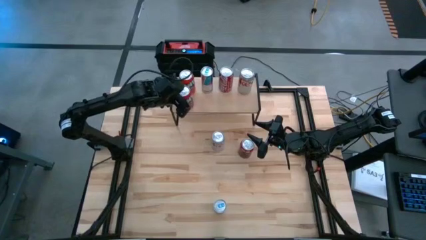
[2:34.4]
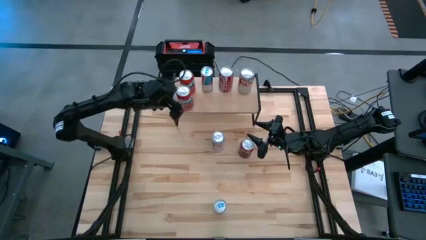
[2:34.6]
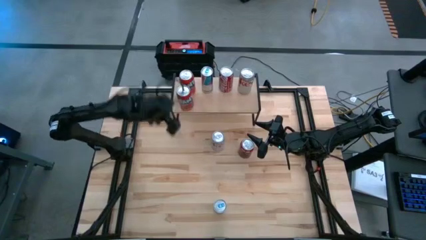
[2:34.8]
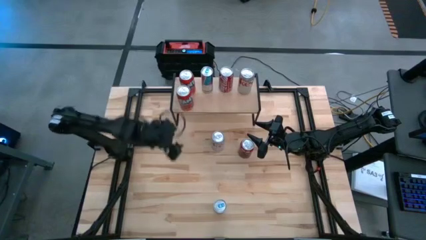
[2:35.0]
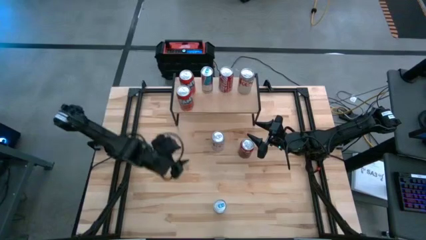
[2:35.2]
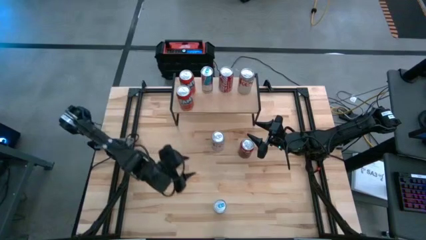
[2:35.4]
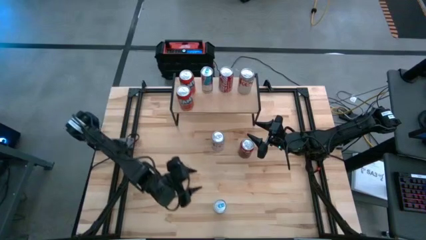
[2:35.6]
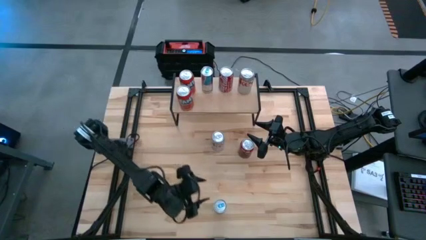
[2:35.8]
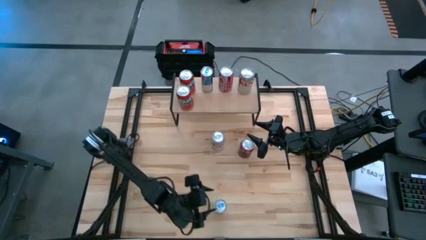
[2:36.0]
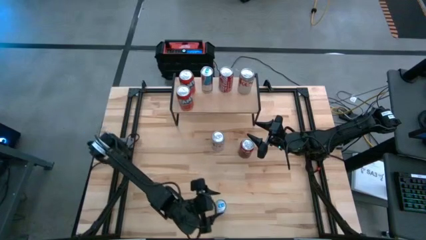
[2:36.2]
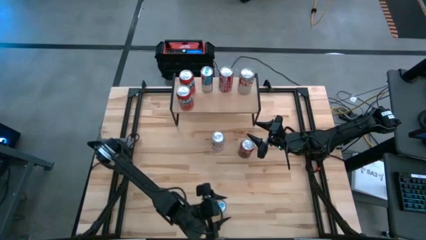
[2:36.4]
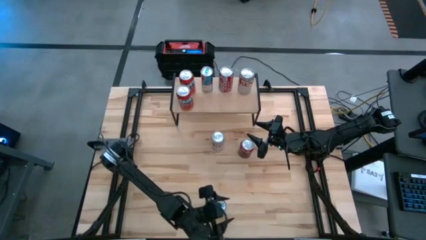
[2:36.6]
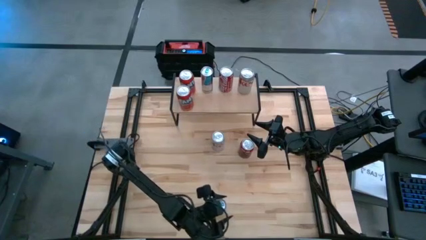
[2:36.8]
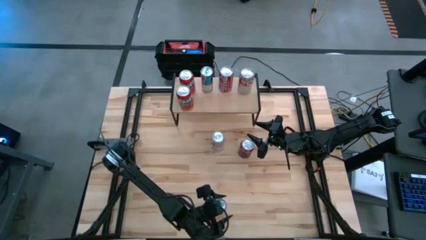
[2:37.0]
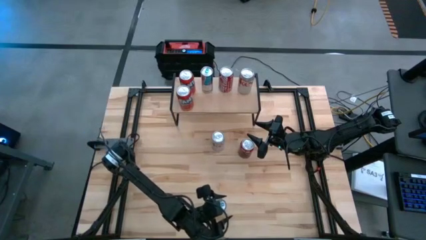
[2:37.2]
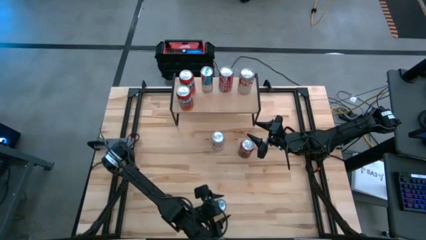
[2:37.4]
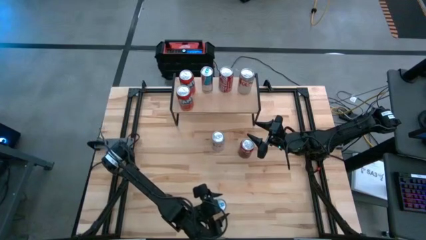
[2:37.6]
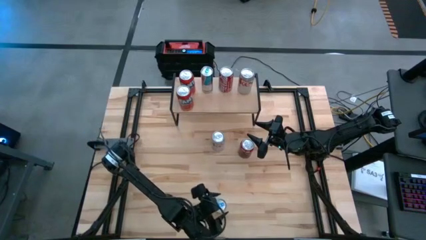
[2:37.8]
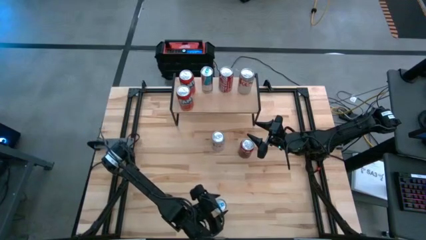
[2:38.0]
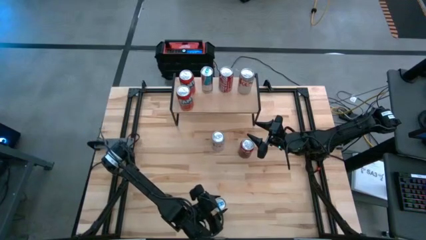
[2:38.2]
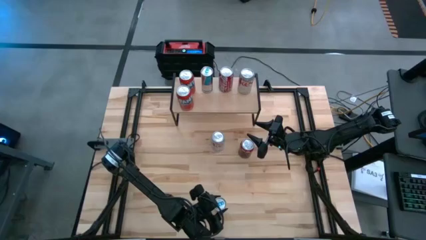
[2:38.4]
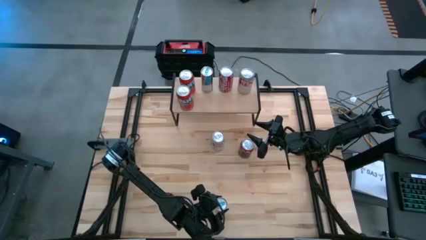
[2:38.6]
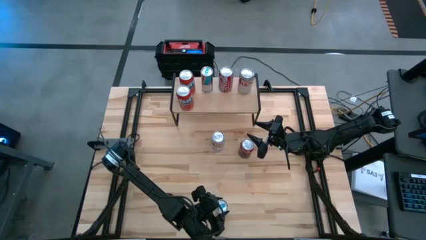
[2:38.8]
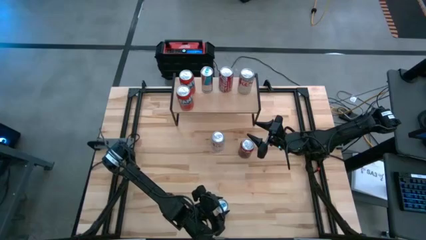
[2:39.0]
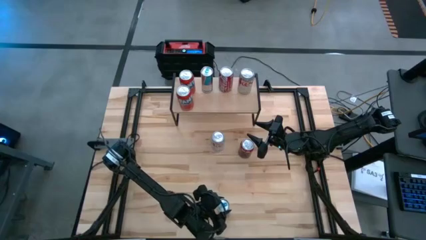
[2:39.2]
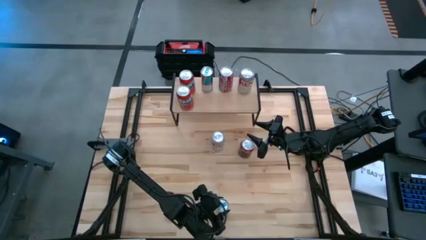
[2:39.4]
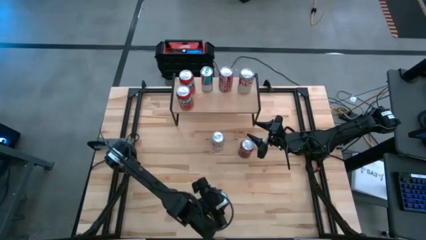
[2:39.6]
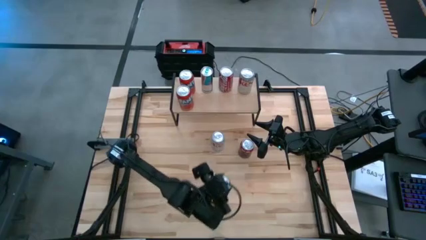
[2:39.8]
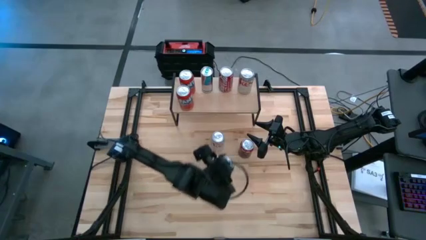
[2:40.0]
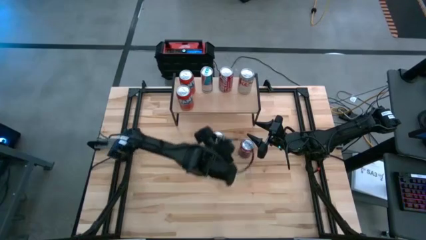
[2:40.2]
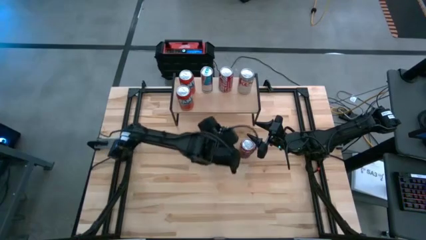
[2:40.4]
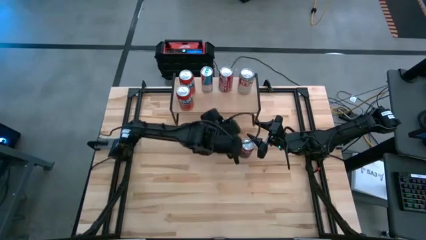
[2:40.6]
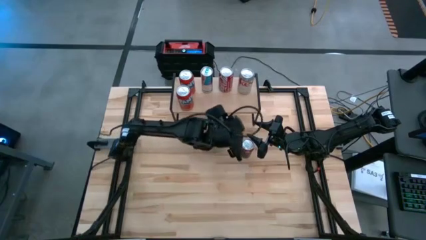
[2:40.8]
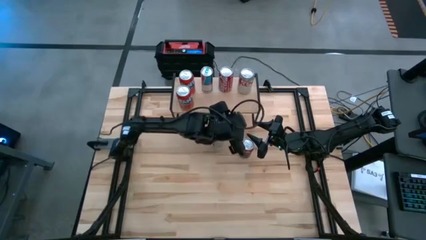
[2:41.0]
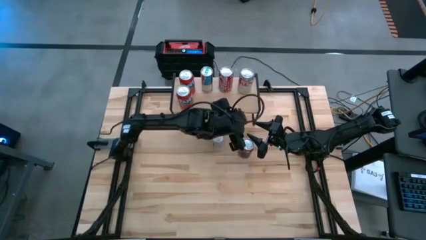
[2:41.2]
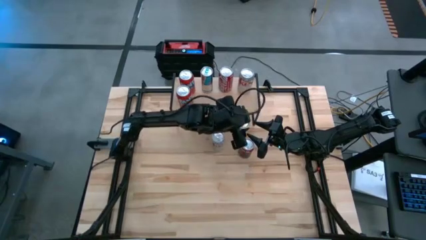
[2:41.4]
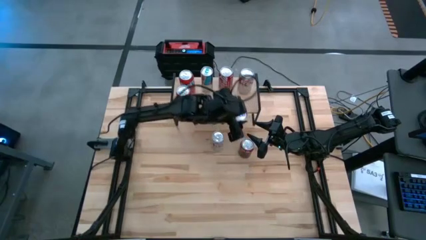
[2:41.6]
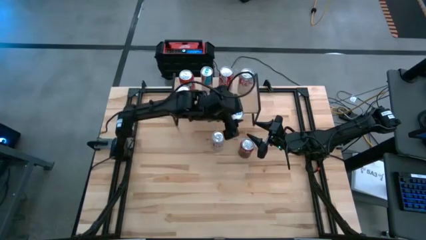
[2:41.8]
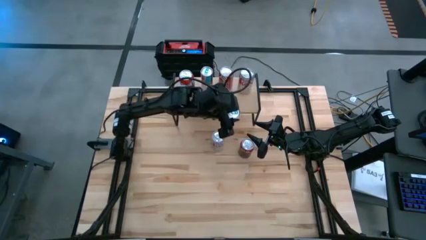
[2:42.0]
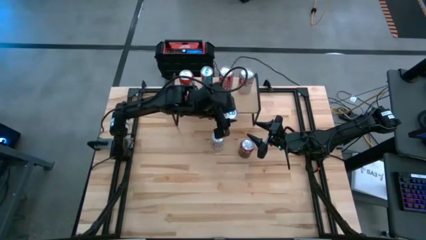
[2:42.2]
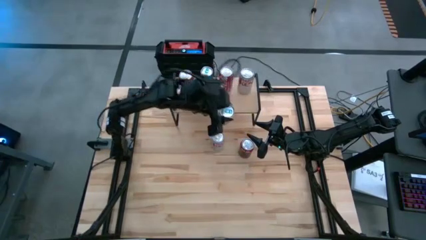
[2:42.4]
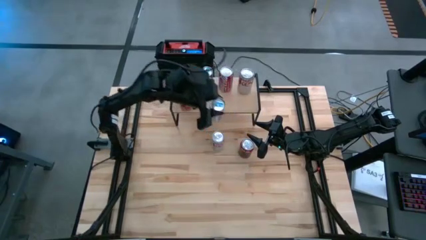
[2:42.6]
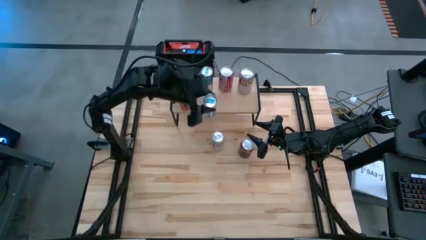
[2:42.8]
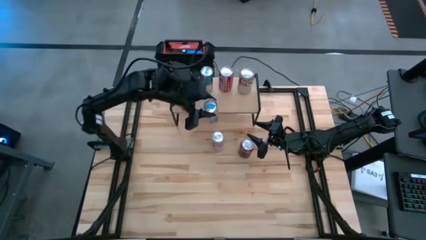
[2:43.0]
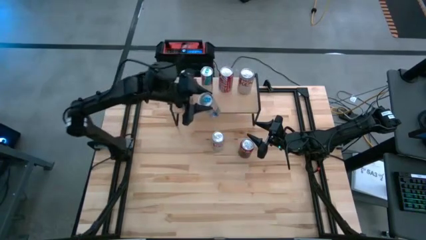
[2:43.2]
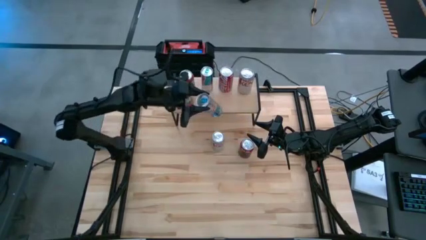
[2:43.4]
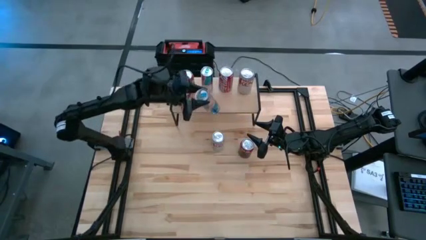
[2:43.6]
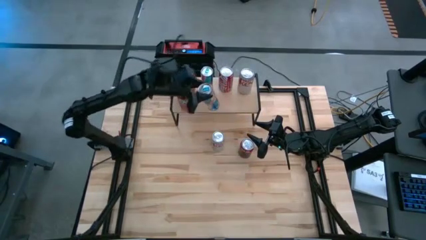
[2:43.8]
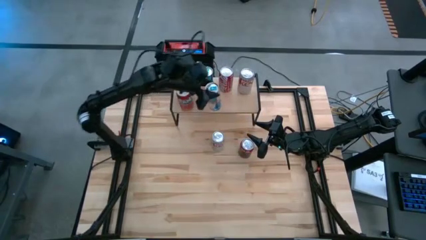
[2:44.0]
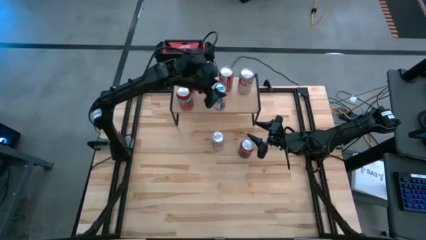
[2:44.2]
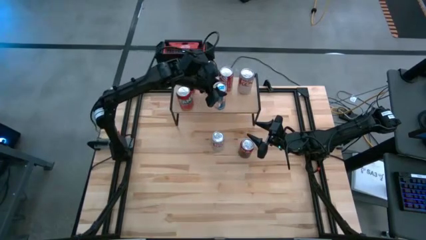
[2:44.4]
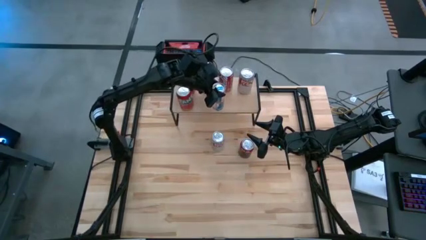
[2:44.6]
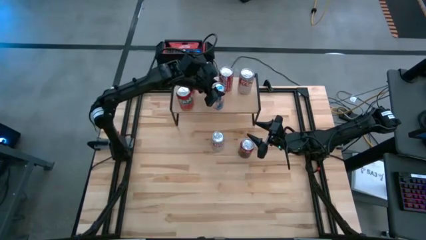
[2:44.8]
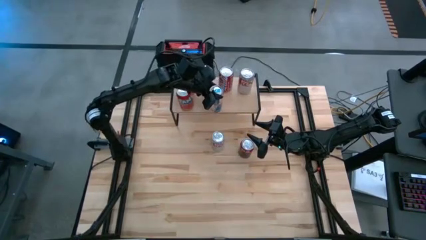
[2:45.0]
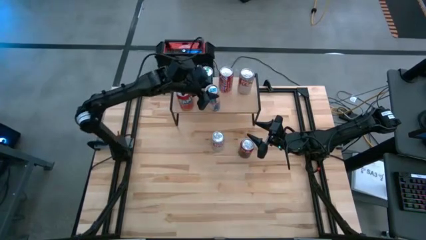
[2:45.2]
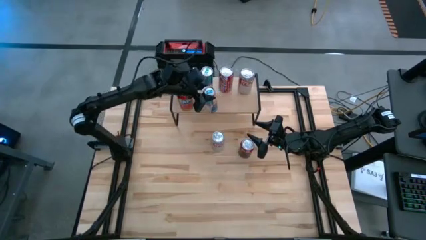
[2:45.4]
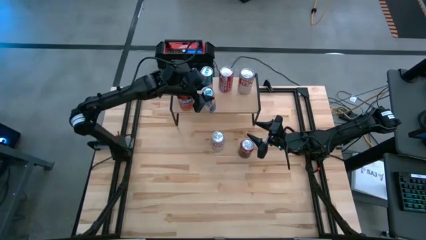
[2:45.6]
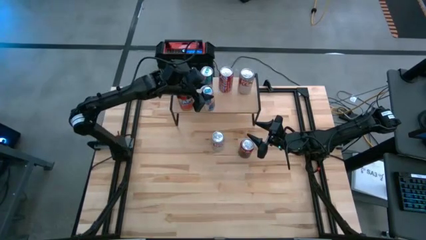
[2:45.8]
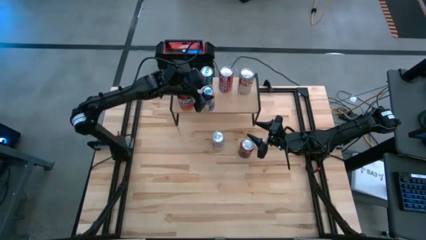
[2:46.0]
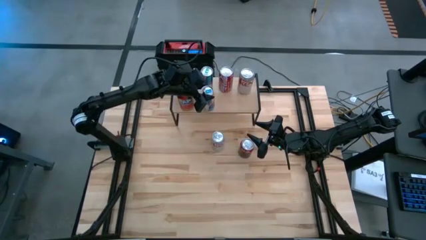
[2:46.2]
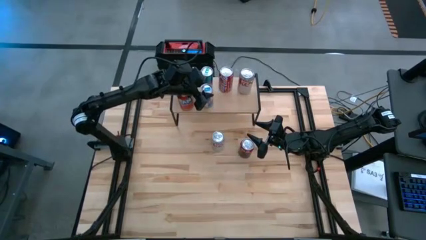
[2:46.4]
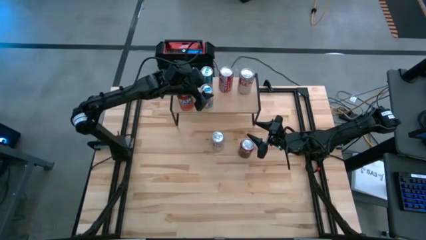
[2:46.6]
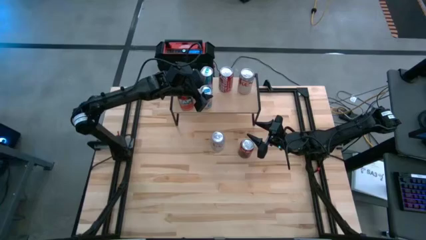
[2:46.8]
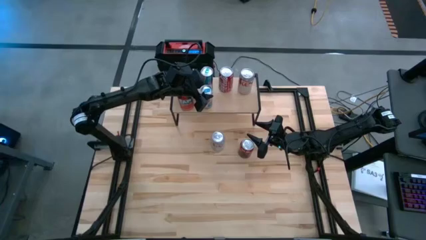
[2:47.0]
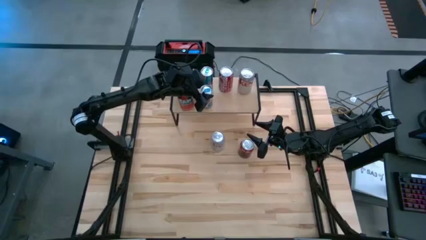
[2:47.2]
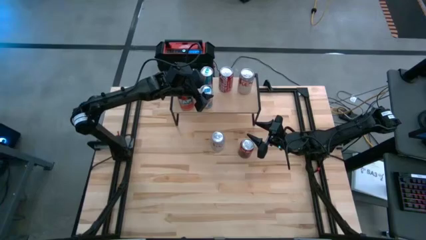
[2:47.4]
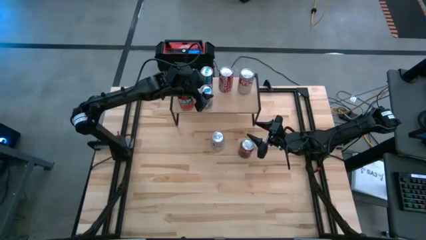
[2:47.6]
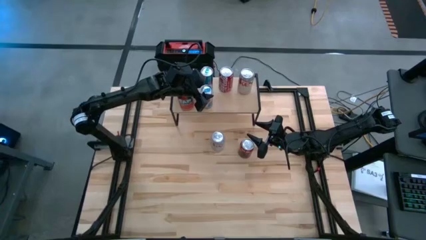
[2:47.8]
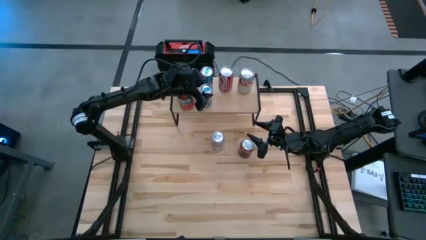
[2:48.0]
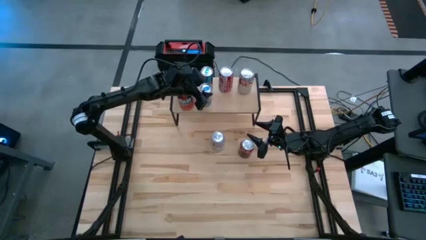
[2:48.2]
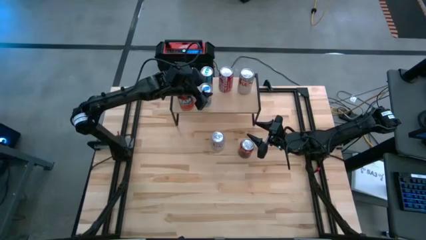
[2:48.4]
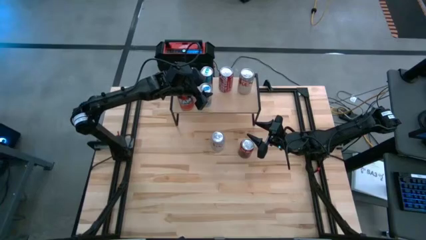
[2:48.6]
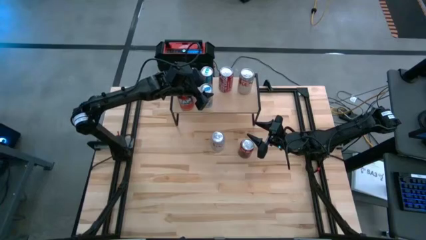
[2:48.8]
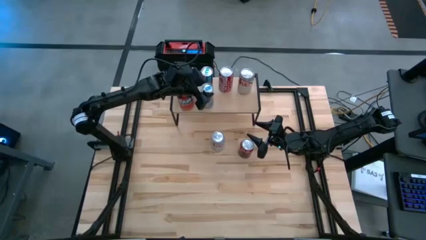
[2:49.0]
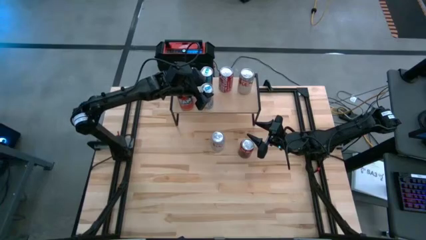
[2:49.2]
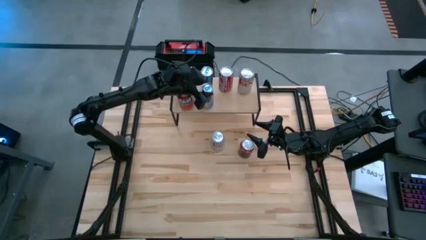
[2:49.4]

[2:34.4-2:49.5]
Task: Place canned beverage on shelf
Put the blue soda can on the shelf aligned with the other blue soda can
